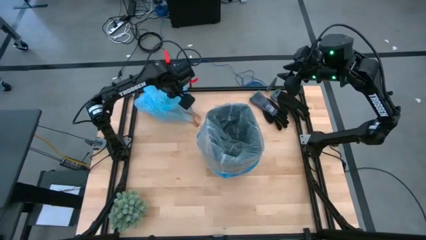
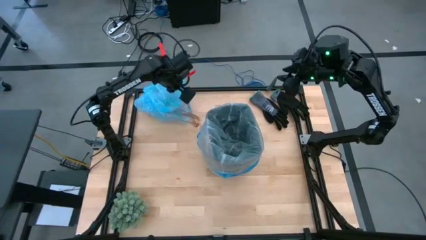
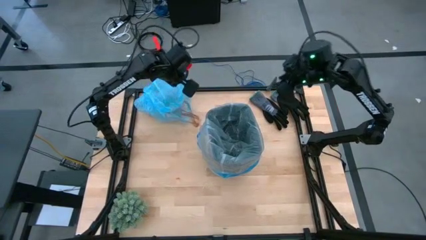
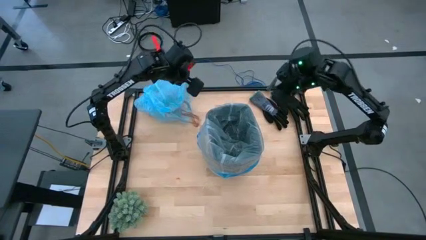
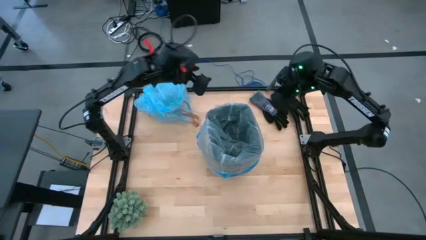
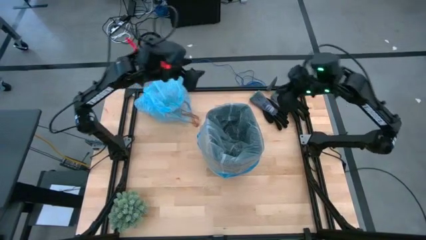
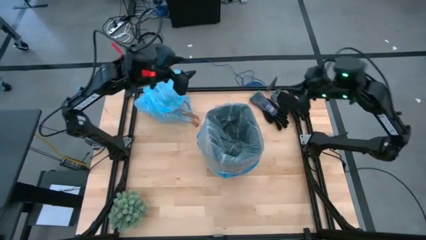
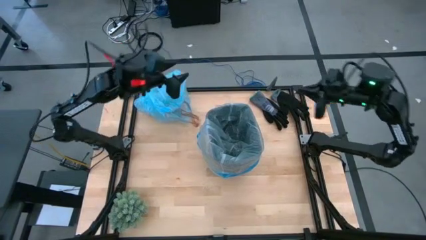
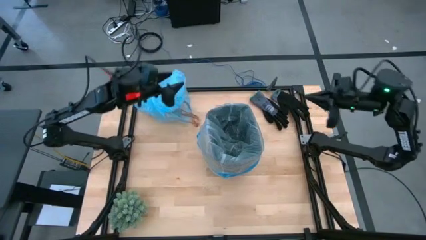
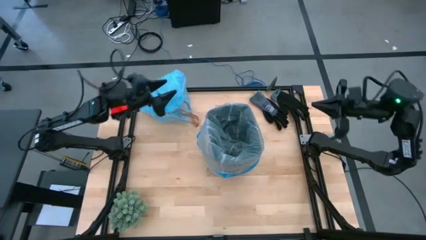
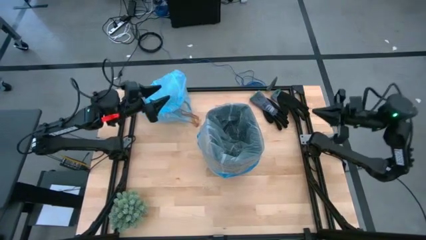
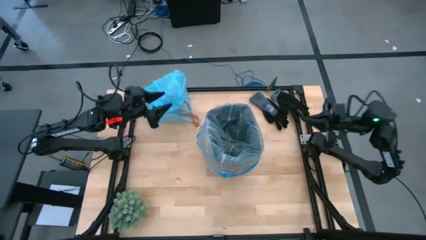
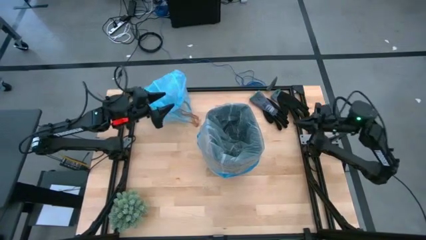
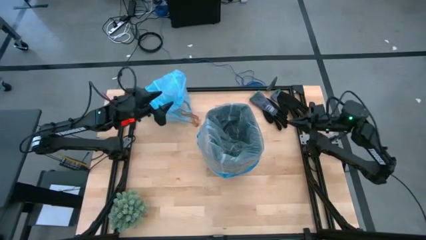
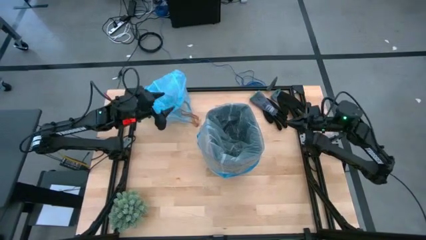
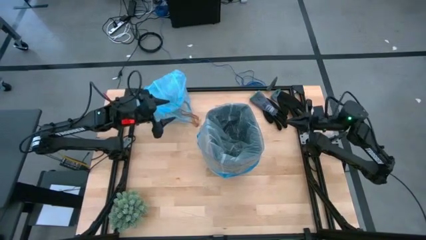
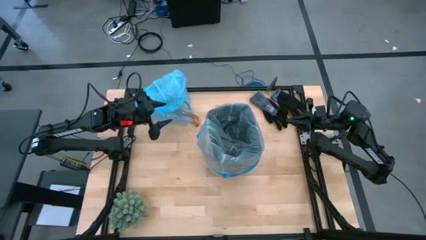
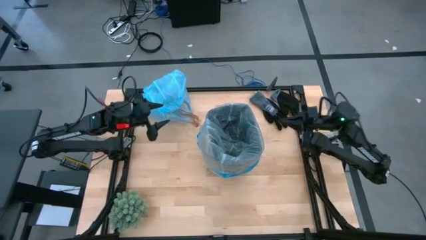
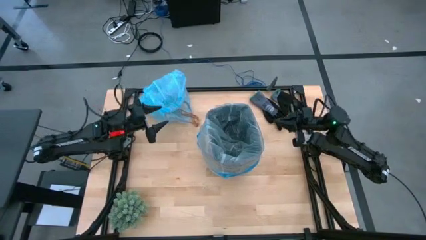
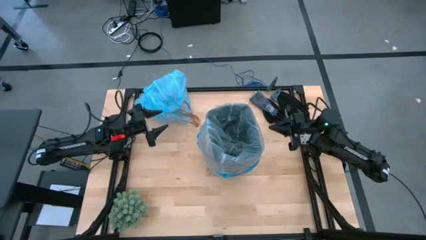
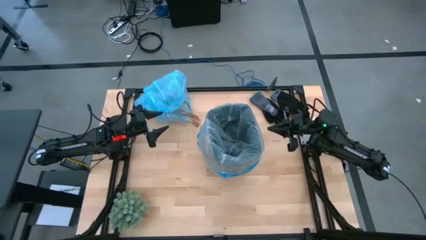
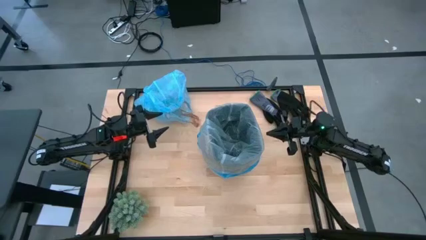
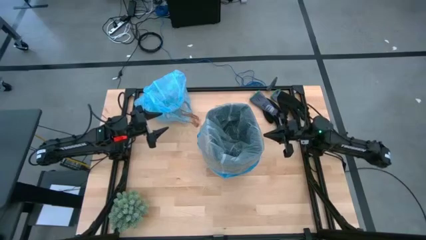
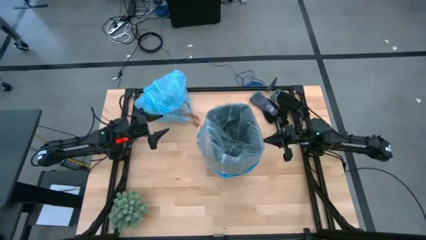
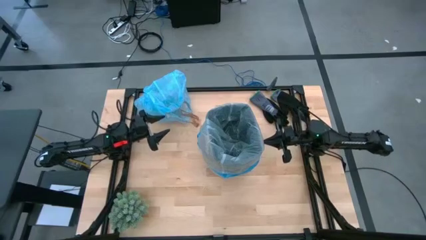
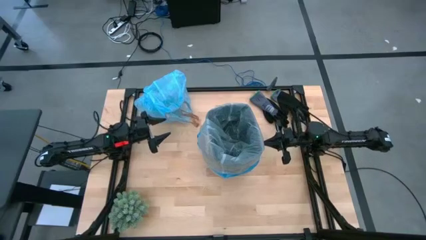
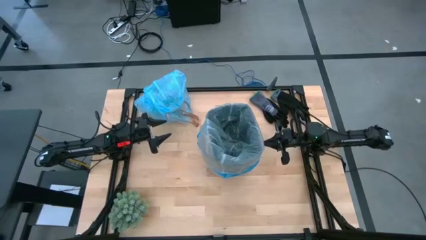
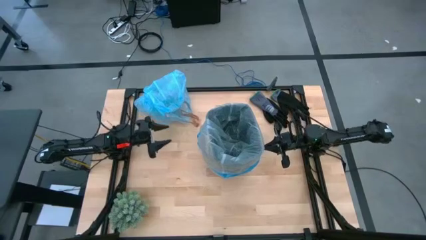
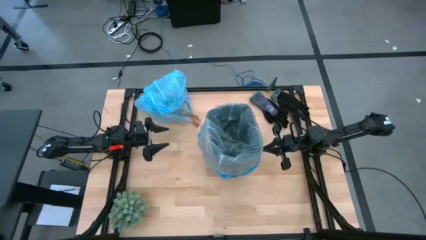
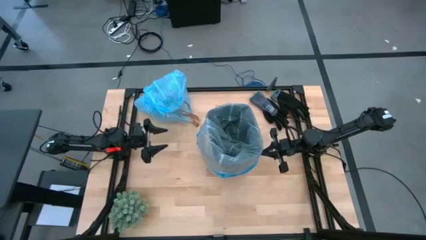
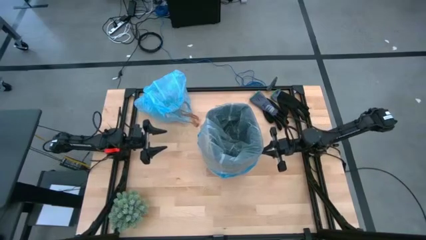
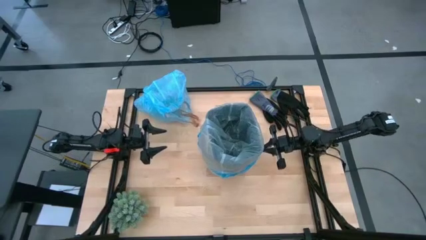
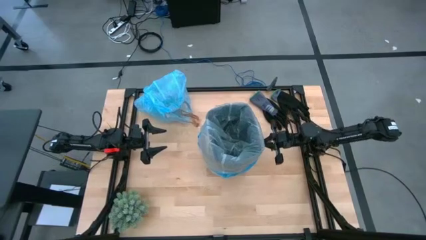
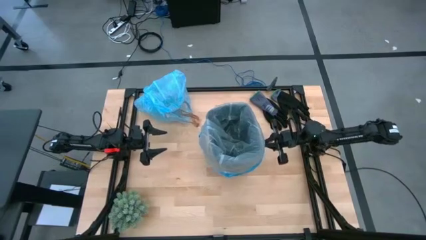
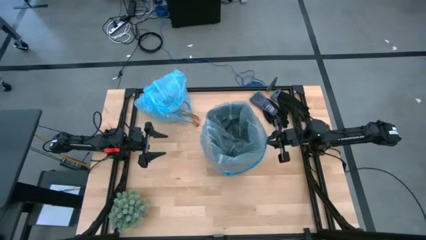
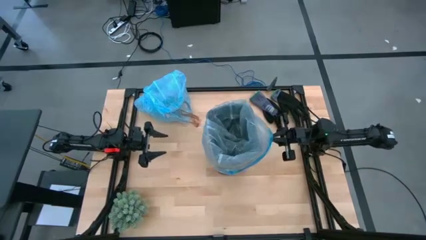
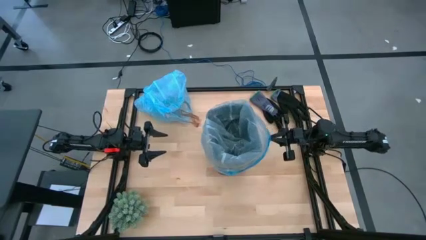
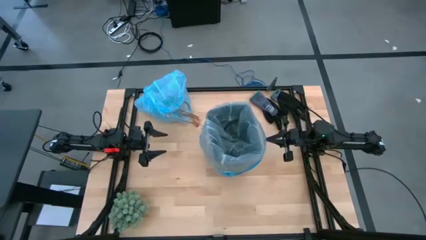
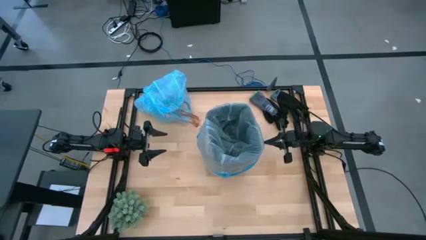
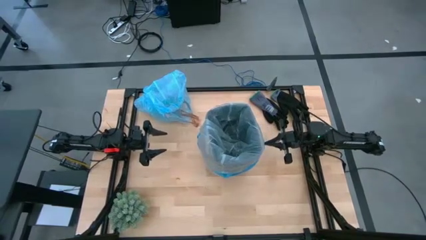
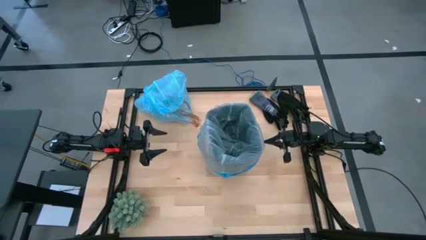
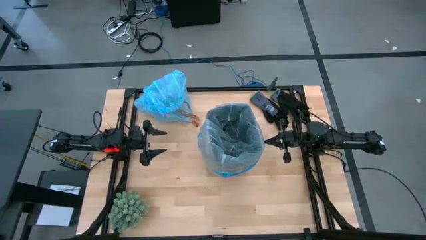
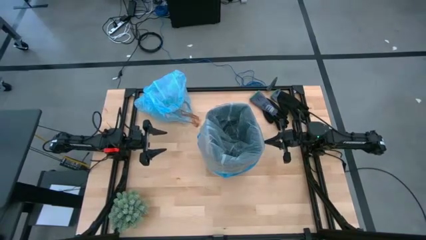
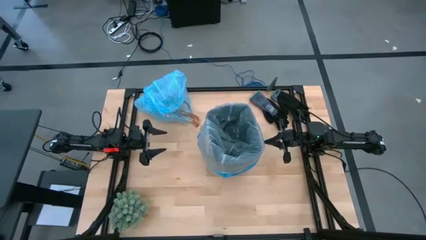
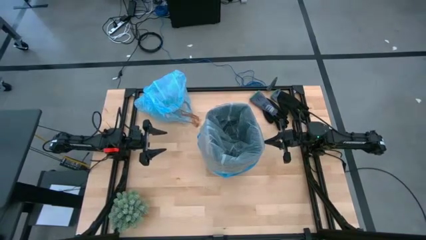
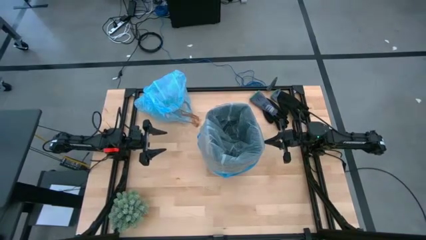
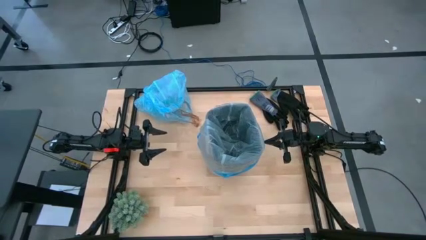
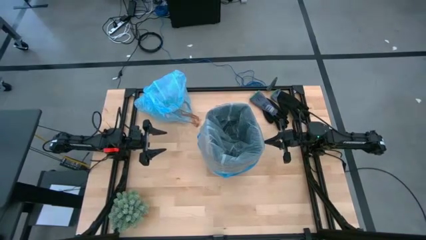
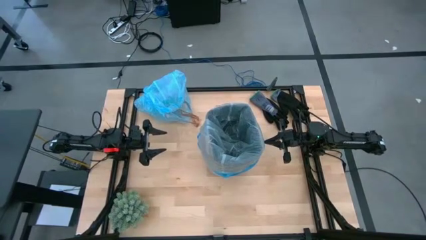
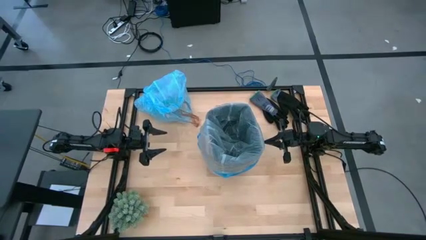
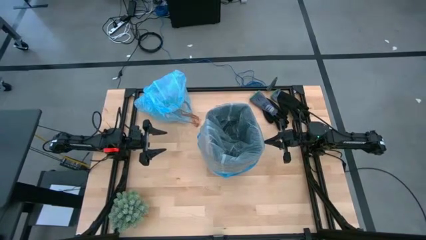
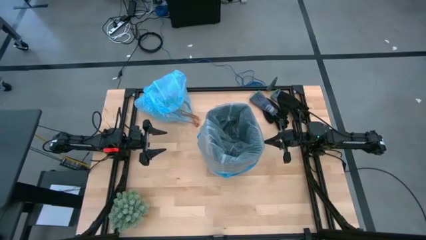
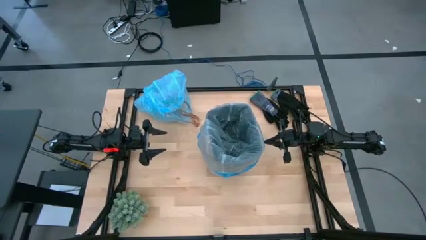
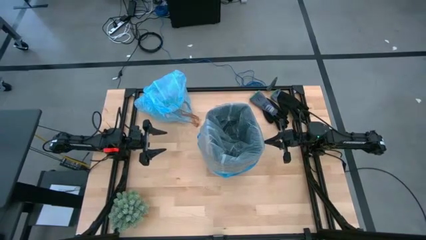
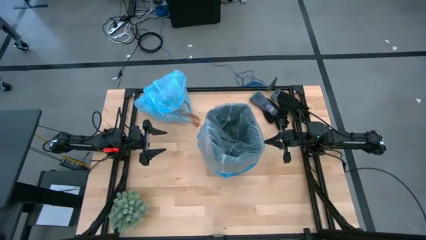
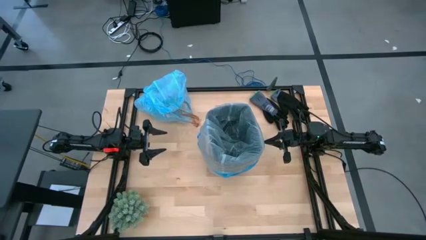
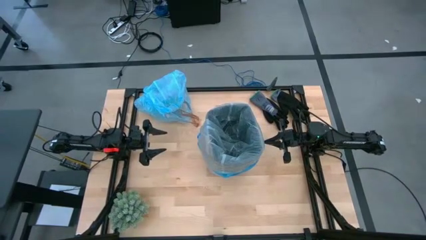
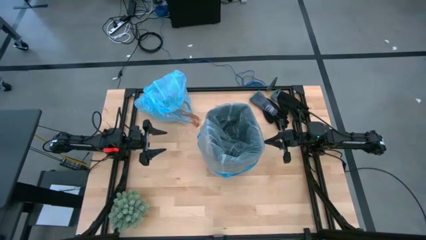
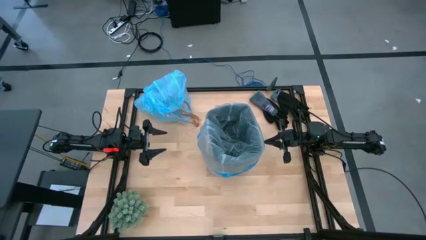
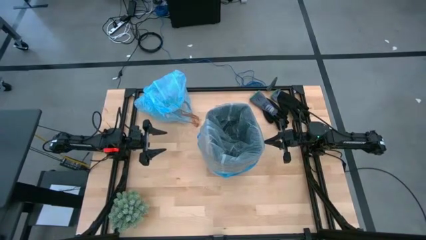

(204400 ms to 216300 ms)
Task: place trash/remove bag and relplace
Return to Home Position

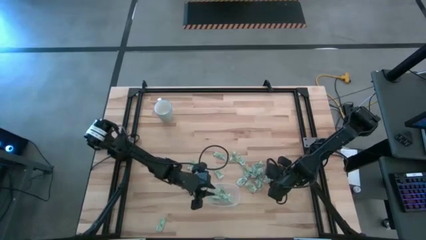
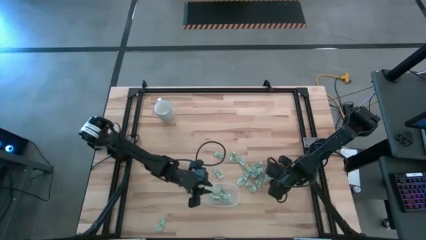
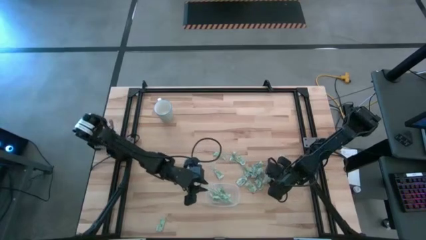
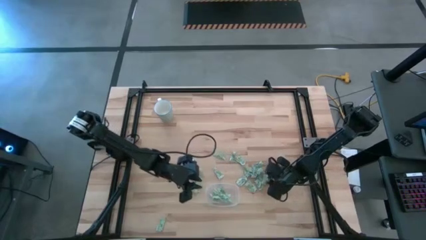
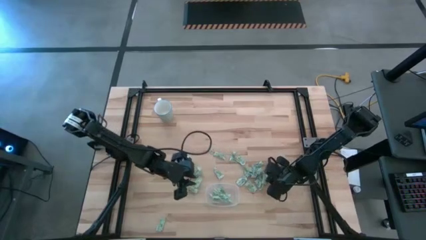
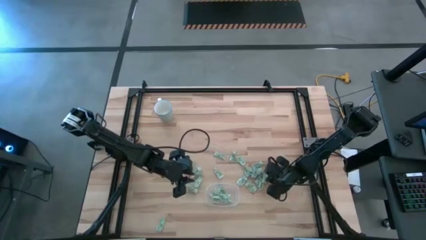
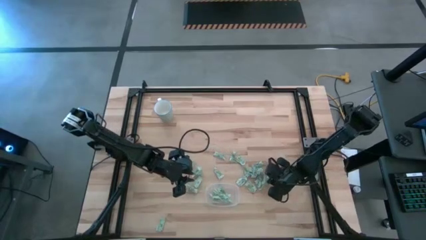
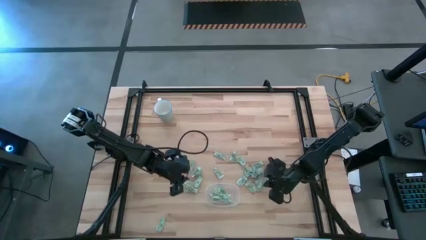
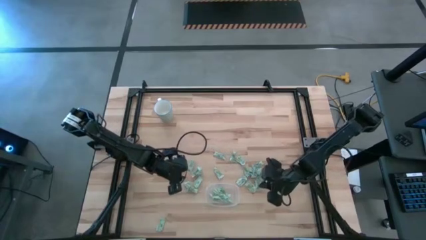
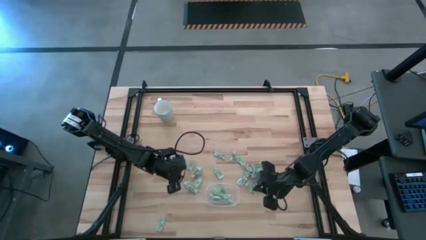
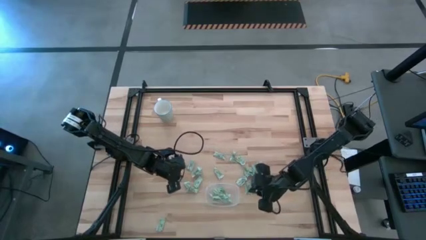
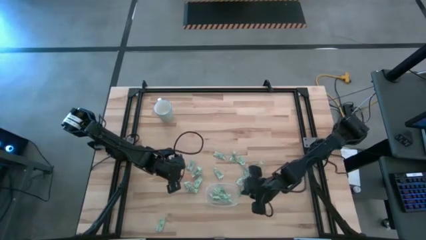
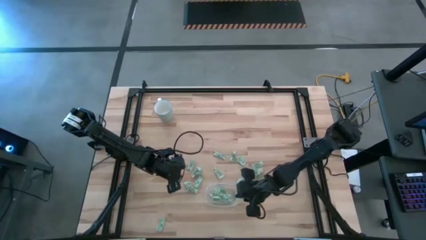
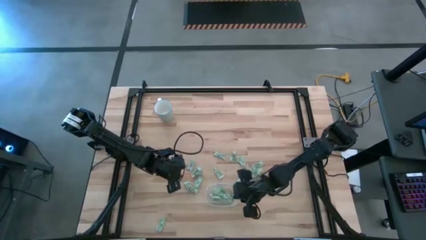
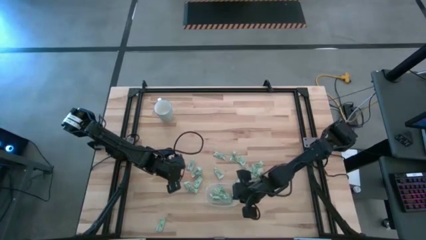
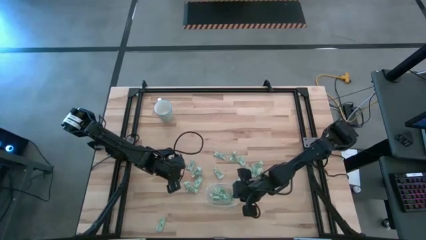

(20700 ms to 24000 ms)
Task: Pick and place Stevia / Truvia into bins
Put the stevia packet into the transparent container

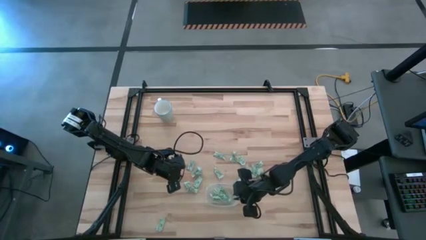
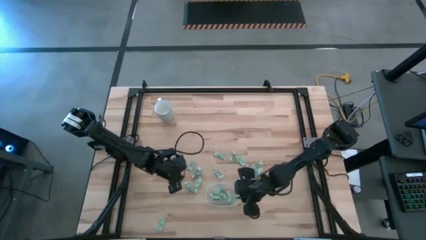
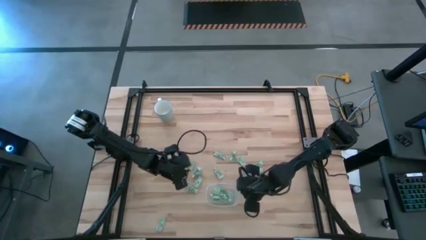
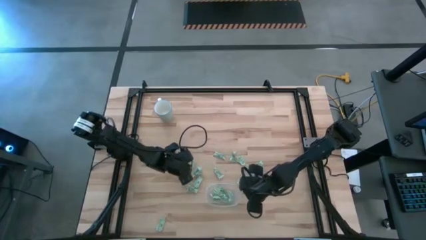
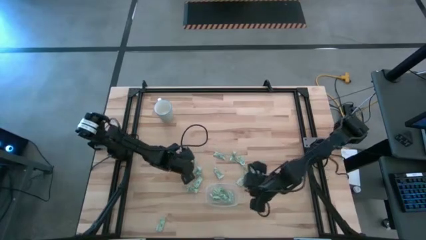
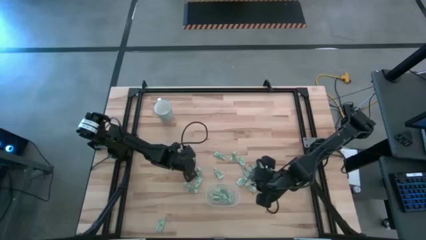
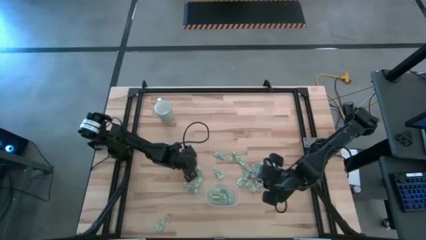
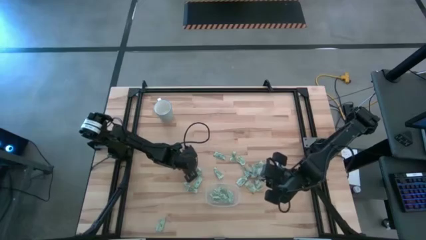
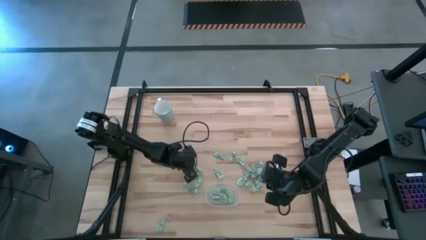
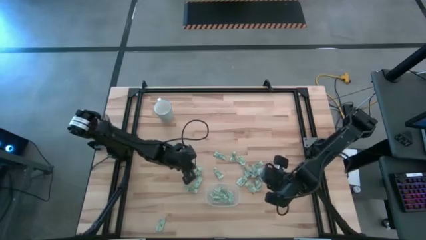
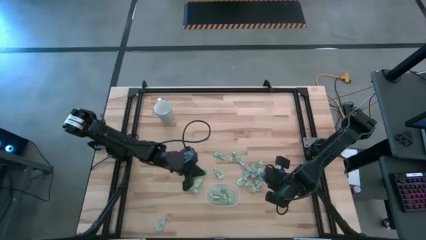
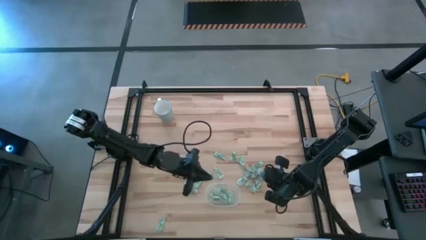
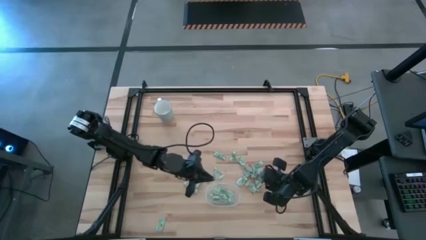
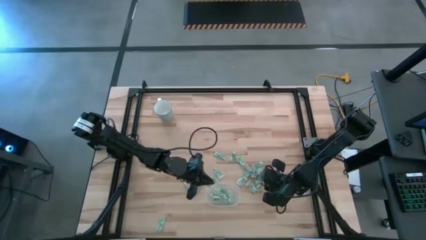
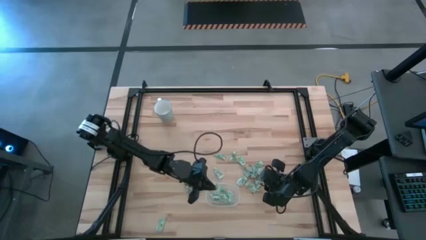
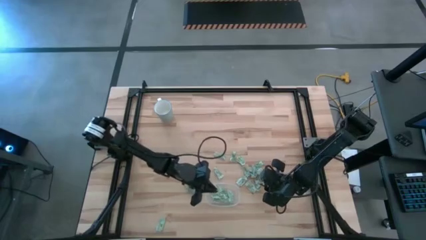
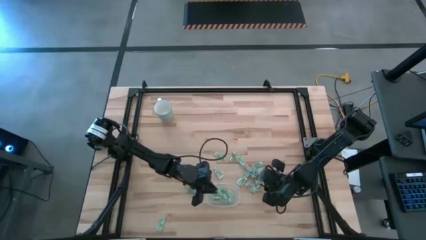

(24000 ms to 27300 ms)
Put the stevia packet into the transparent container
